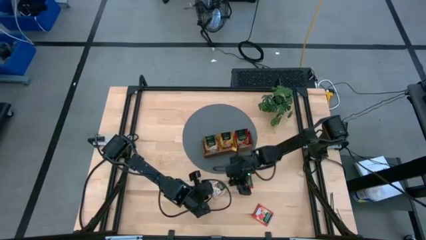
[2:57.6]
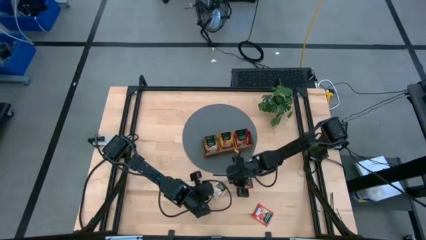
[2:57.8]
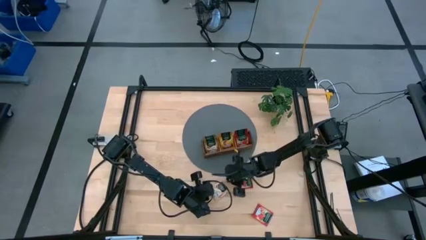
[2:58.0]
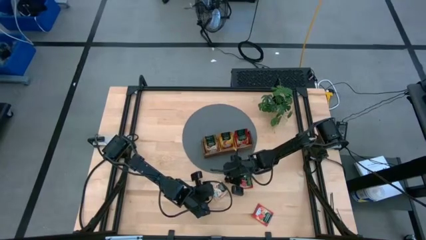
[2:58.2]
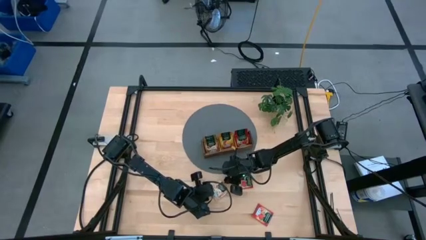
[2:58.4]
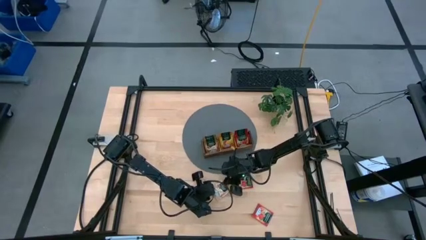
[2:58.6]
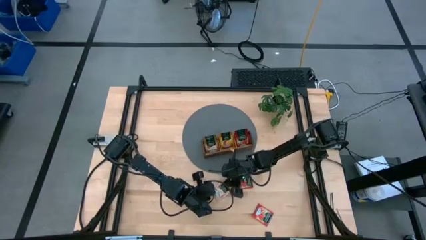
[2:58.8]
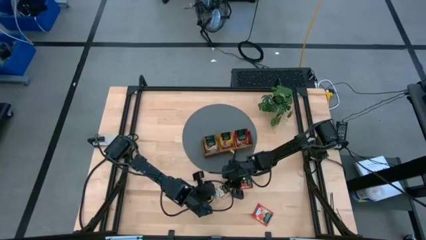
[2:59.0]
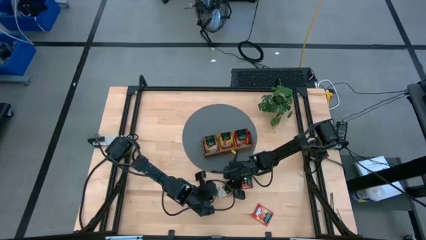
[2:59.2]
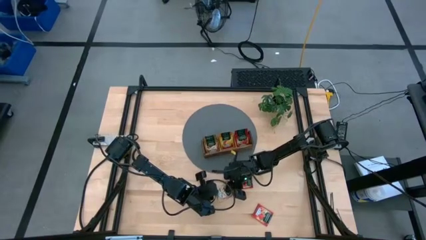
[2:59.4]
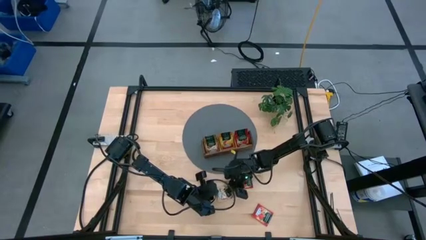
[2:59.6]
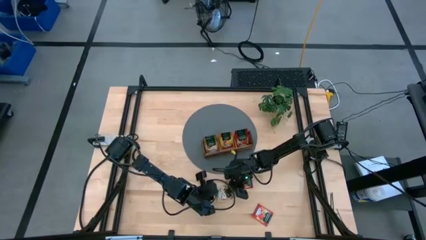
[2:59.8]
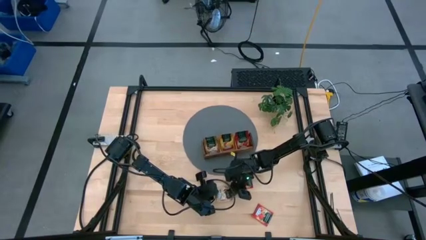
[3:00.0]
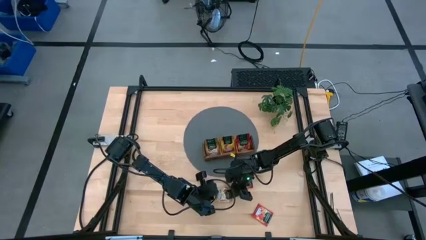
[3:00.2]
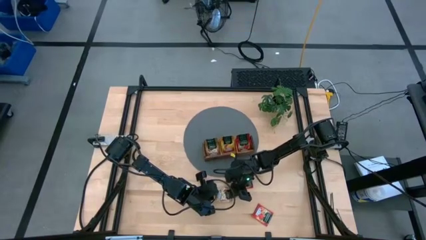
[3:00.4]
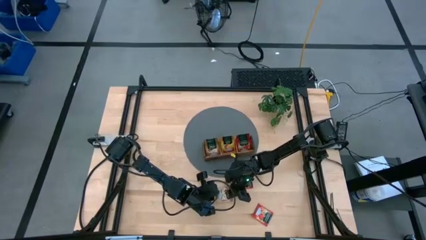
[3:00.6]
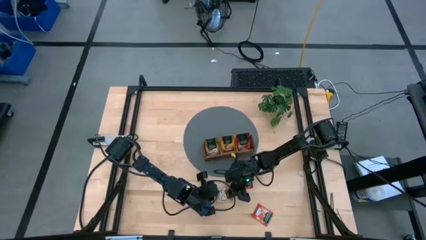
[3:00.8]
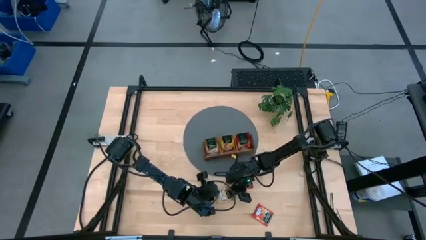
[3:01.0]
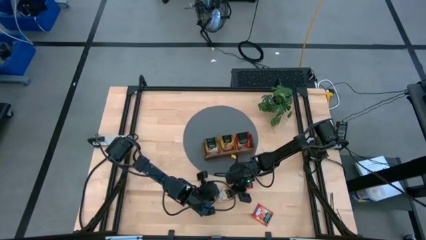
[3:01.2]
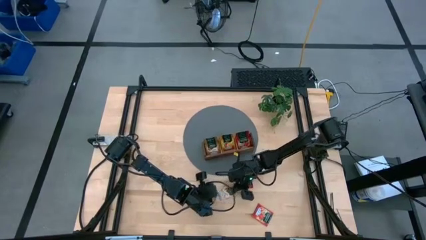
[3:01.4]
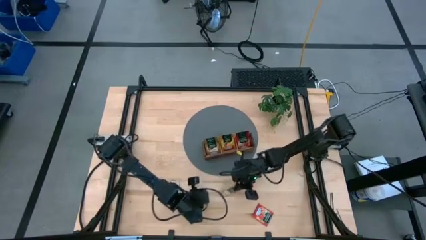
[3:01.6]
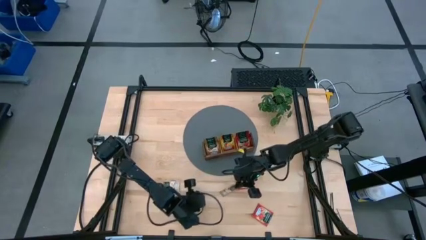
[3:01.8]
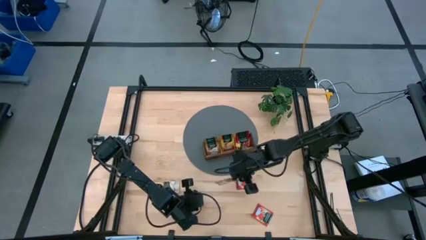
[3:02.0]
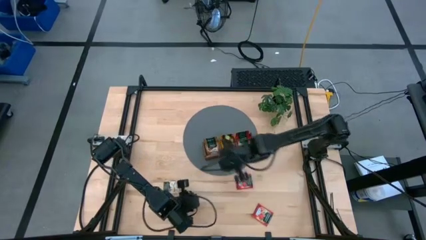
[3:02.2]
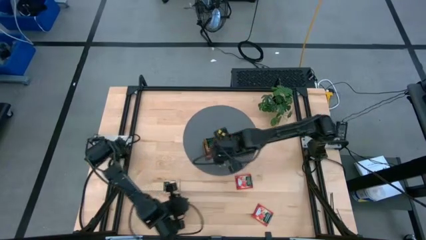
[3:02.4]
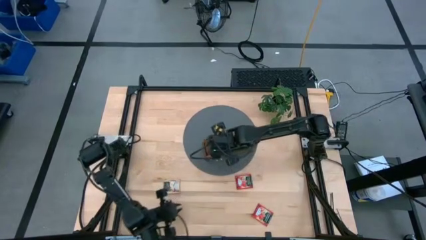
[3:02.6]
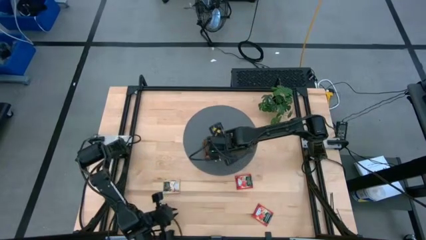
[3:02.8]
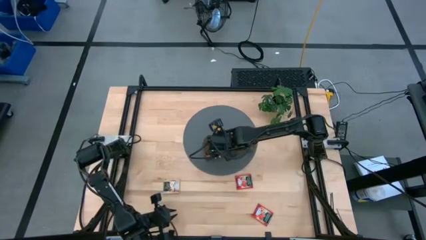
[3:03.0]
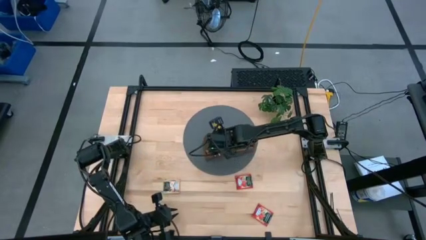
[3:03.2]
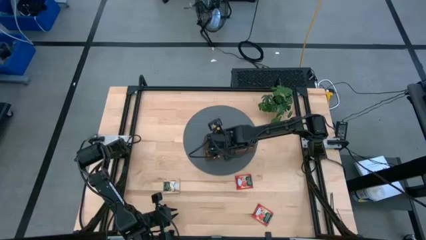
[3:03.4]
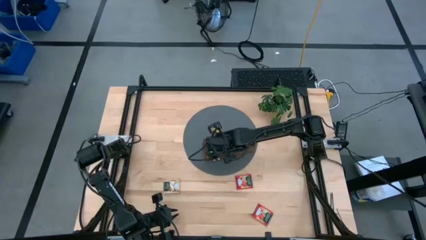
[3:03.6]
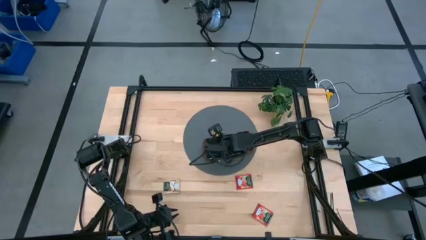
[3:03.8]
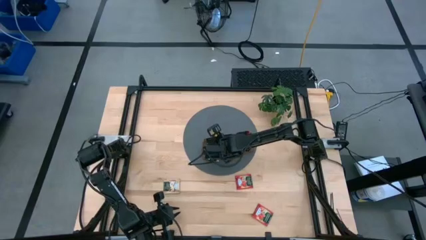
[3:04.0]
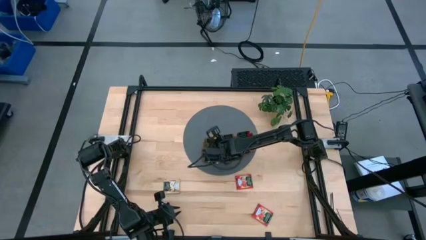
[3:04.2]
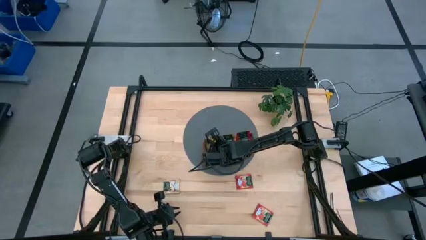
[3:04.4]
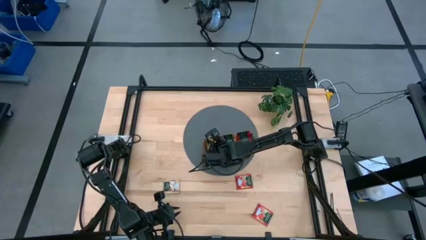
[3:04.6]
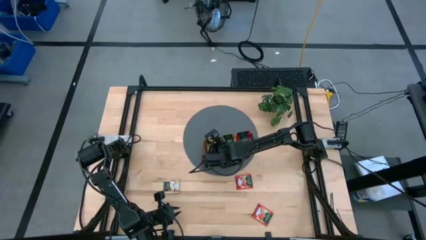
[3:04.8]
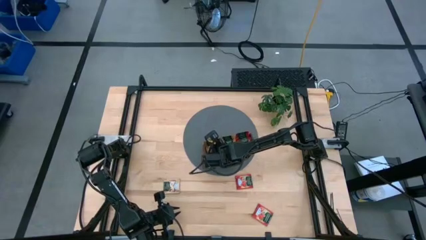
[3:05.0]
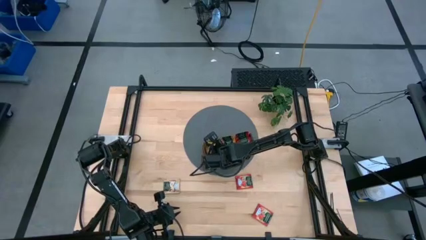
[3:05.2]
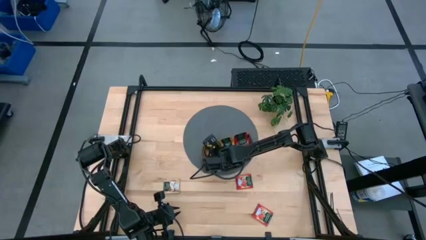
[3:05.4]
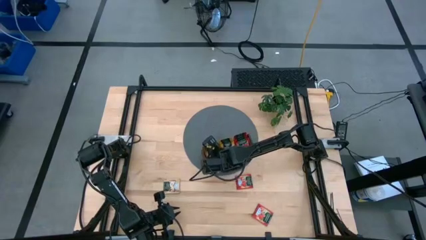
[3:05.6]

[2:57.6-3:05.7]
Task: Pick & Place Tea
Put the brown tea bag into the left section of the wooden organizer

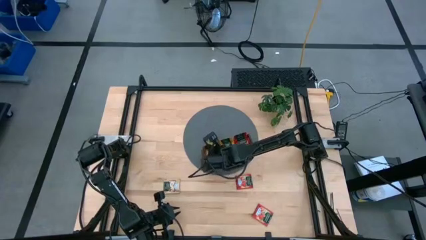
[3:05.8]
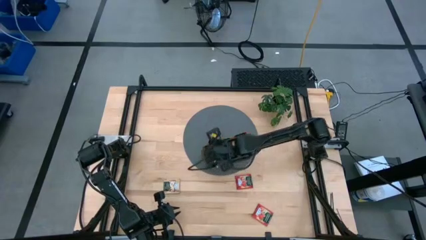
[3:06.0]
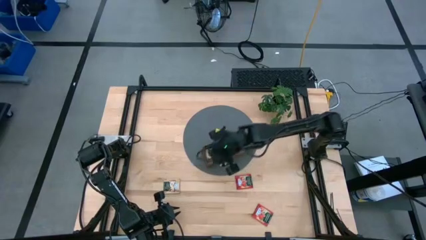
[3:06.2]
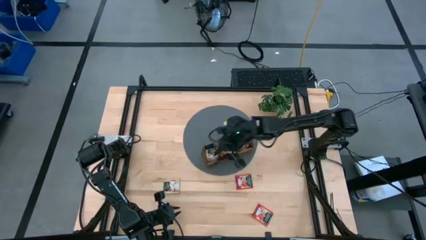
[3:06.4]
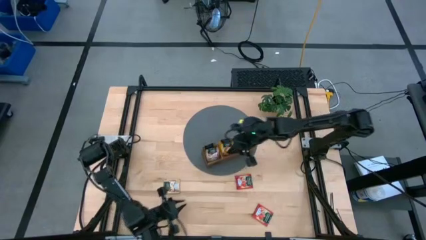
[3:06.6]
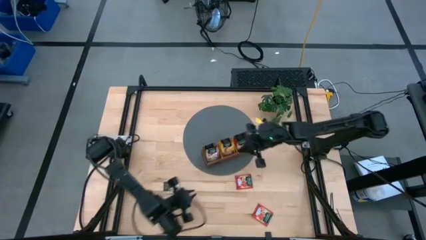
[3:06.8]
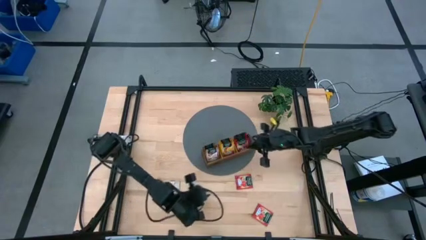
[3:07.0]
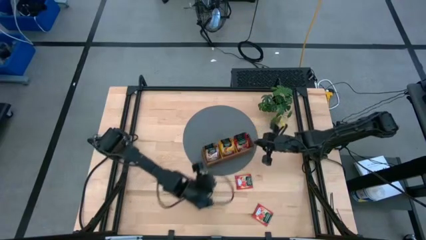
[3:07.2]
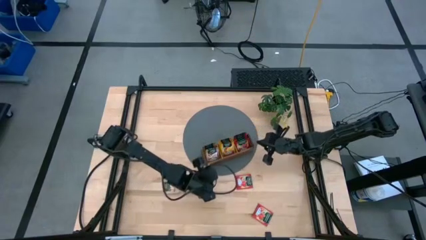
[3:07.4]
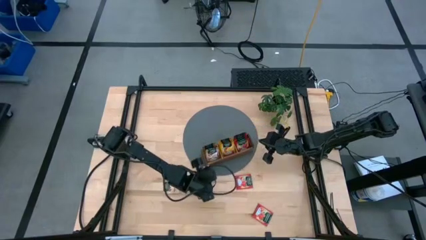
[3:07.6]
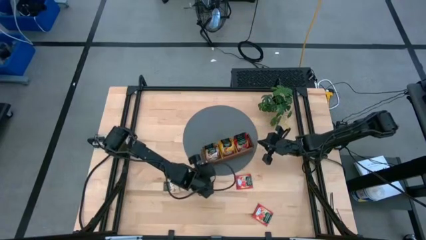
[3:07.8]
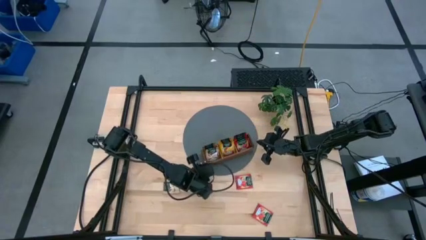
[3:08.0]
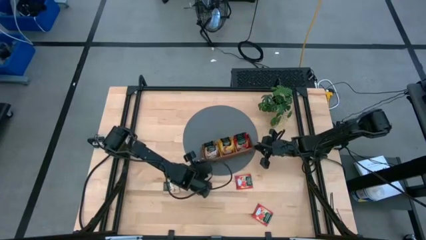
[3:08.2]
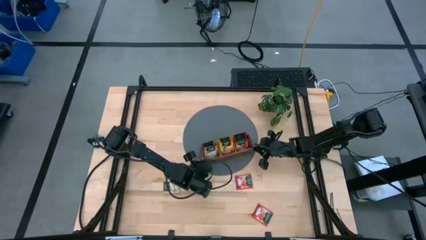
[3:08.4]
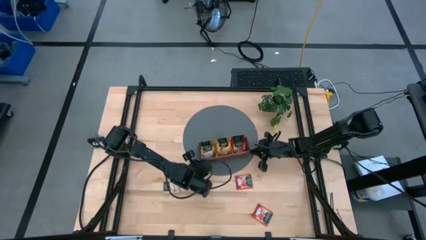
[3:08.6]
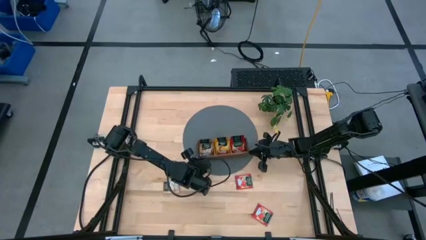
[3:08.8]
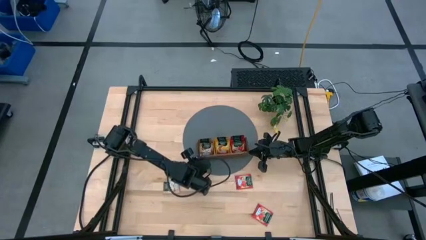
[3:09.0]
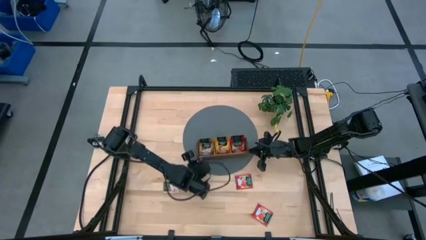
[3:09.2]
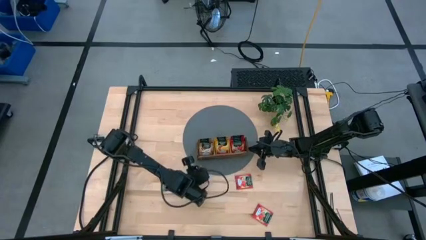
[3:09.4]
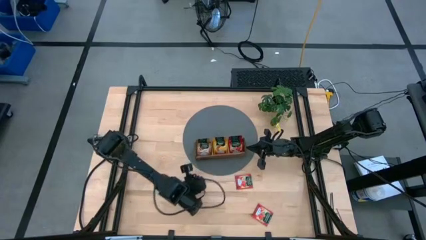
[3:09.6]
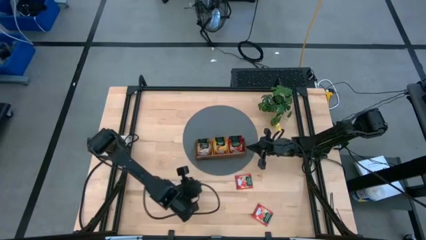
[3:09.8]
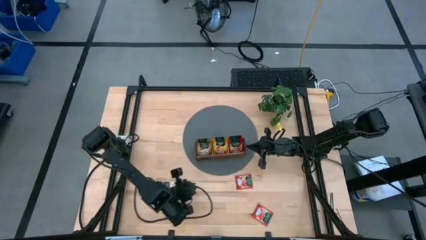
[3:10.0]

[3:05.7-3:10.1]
Adjust the wooden organizer
